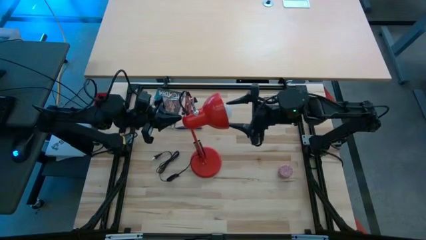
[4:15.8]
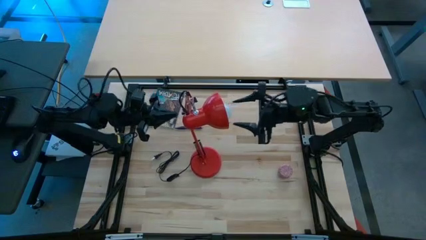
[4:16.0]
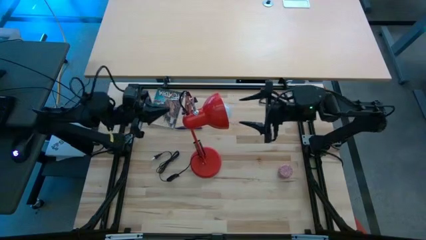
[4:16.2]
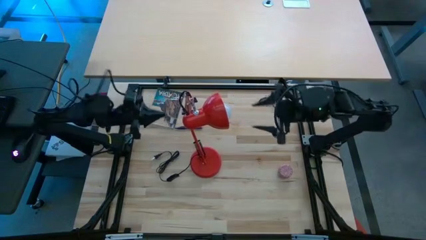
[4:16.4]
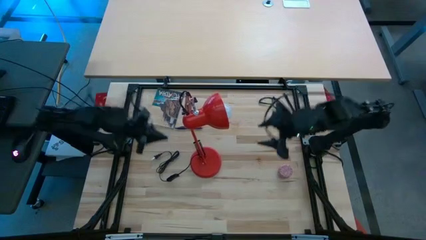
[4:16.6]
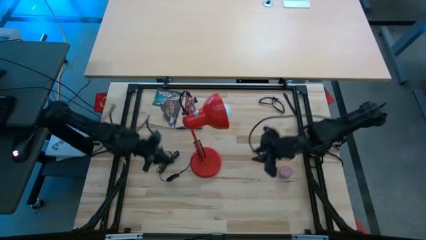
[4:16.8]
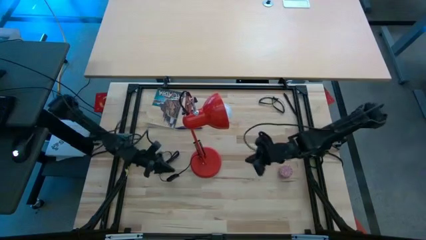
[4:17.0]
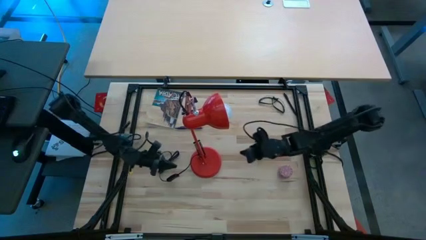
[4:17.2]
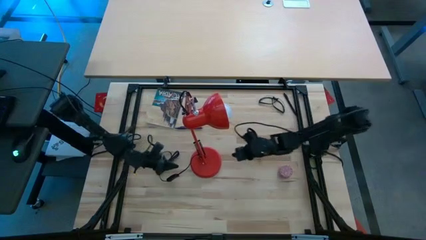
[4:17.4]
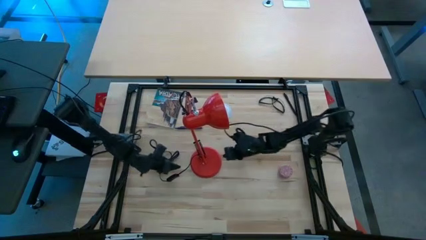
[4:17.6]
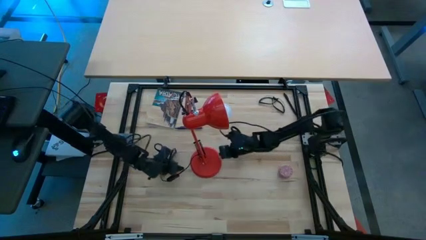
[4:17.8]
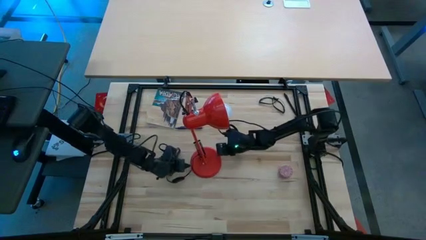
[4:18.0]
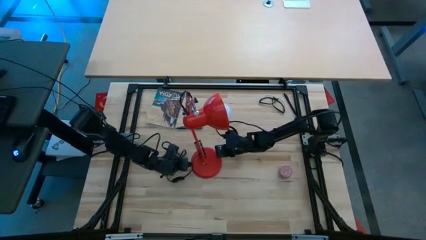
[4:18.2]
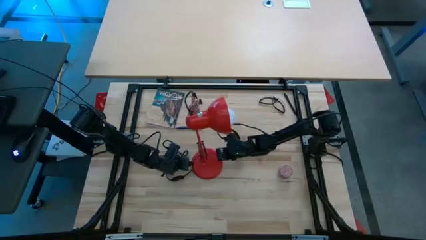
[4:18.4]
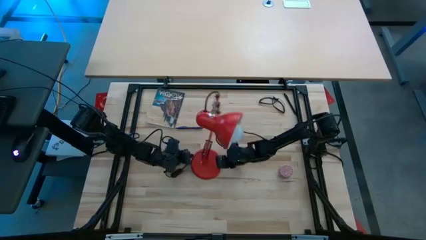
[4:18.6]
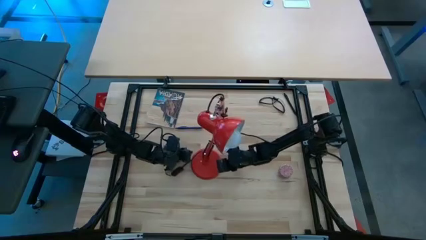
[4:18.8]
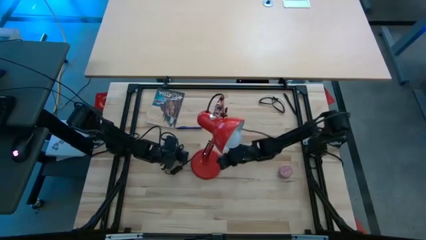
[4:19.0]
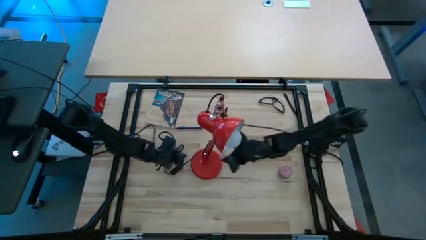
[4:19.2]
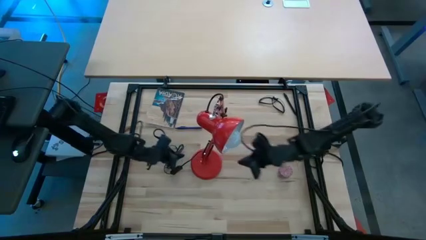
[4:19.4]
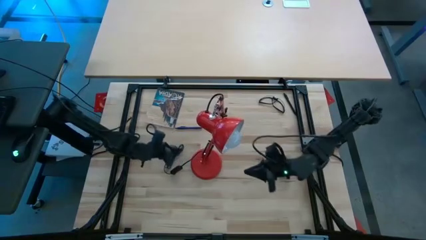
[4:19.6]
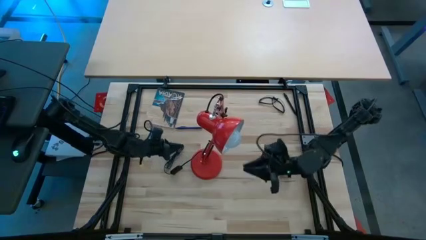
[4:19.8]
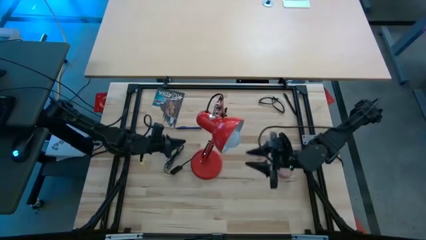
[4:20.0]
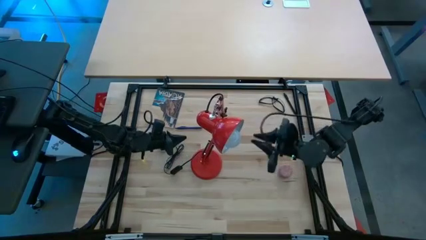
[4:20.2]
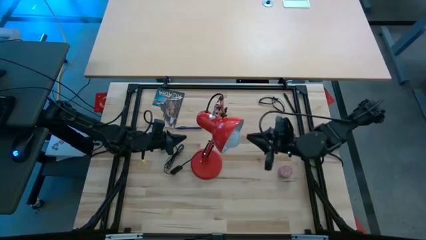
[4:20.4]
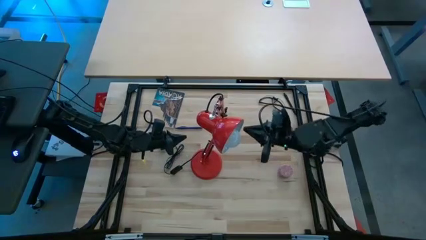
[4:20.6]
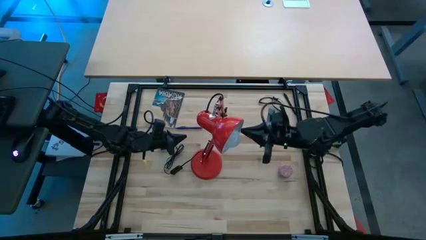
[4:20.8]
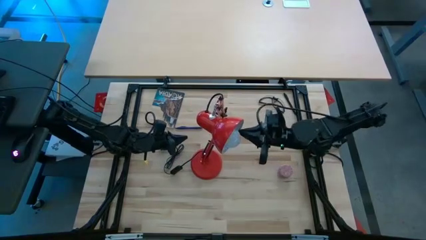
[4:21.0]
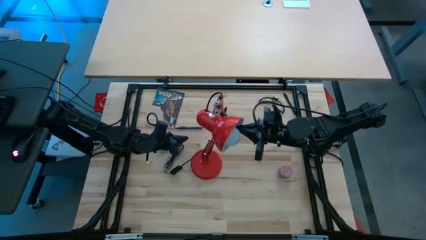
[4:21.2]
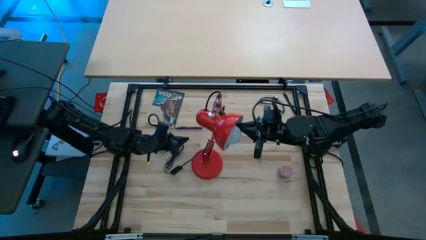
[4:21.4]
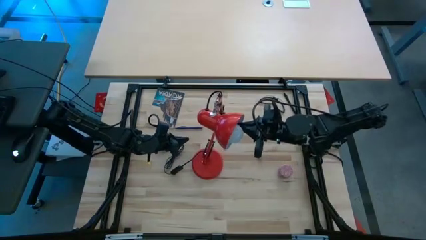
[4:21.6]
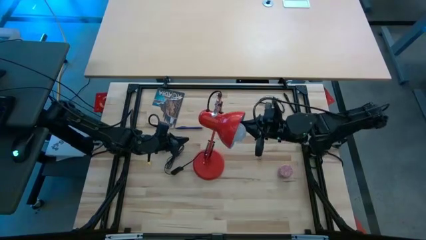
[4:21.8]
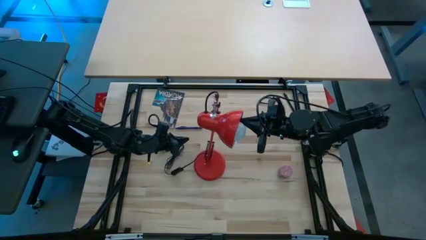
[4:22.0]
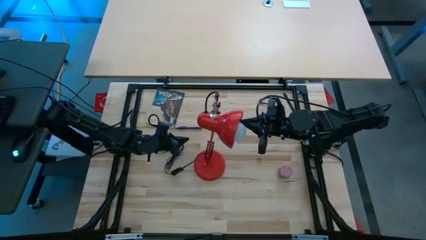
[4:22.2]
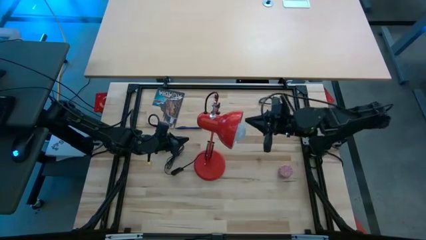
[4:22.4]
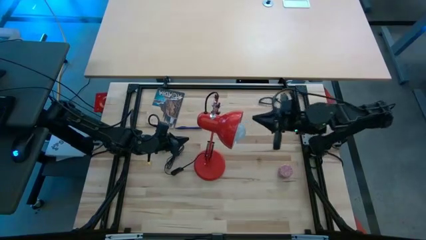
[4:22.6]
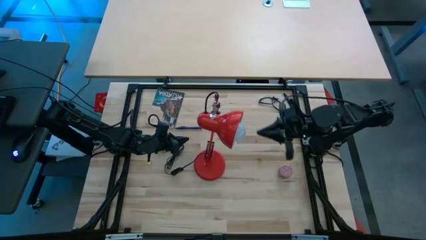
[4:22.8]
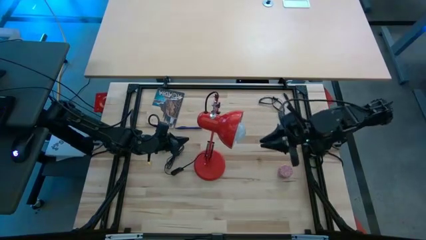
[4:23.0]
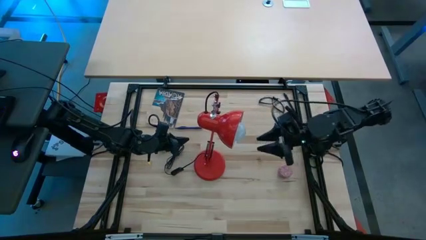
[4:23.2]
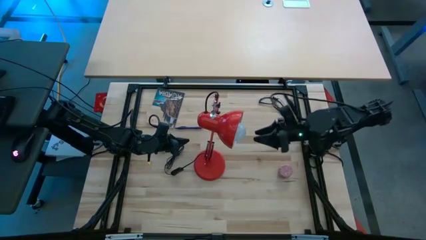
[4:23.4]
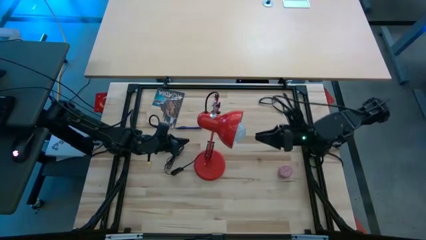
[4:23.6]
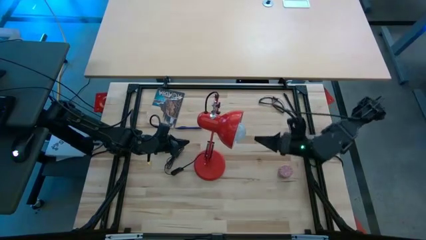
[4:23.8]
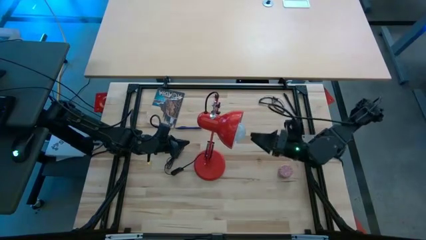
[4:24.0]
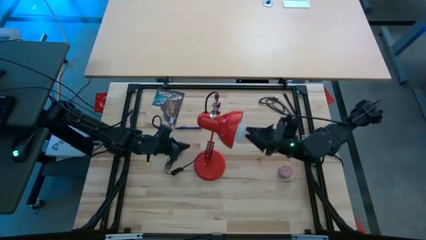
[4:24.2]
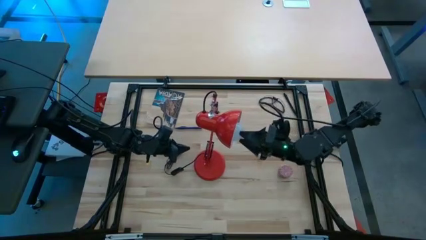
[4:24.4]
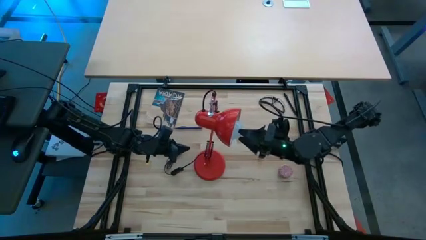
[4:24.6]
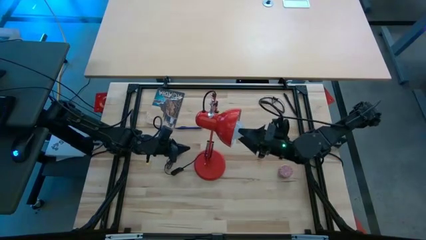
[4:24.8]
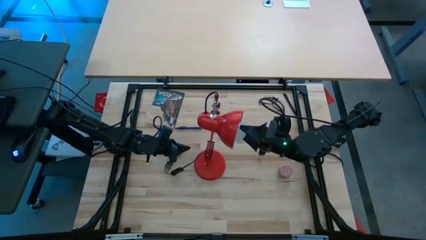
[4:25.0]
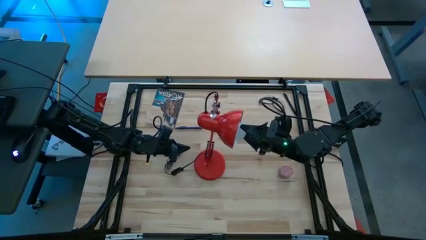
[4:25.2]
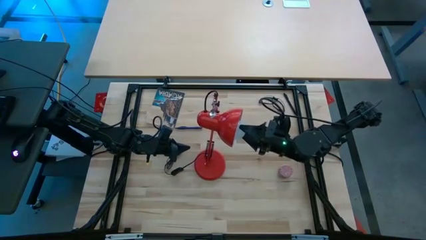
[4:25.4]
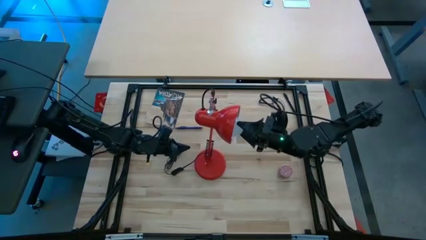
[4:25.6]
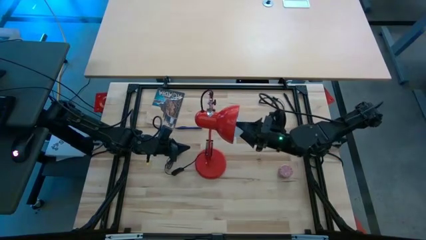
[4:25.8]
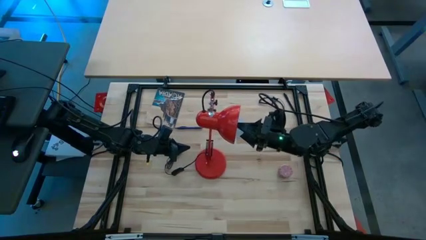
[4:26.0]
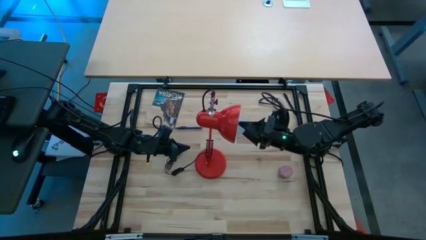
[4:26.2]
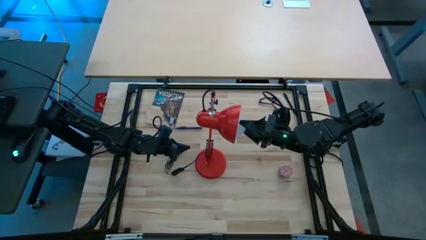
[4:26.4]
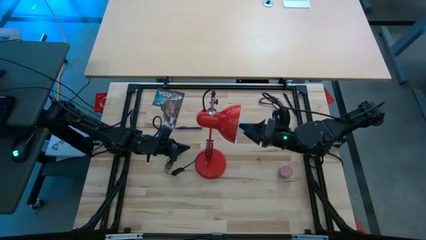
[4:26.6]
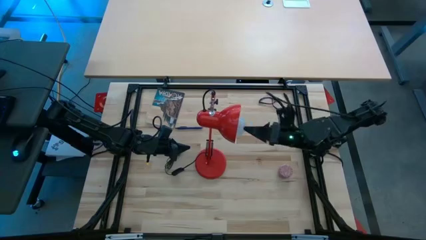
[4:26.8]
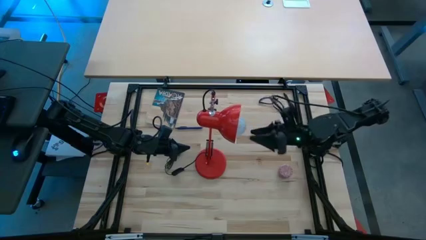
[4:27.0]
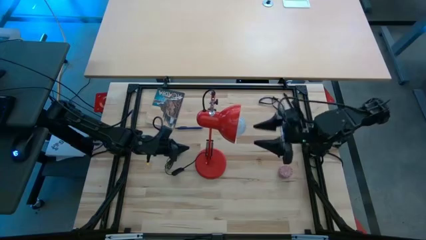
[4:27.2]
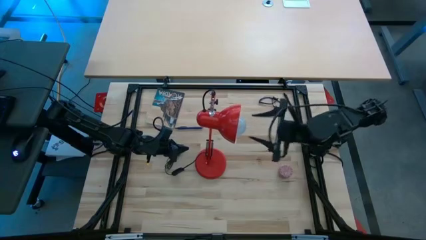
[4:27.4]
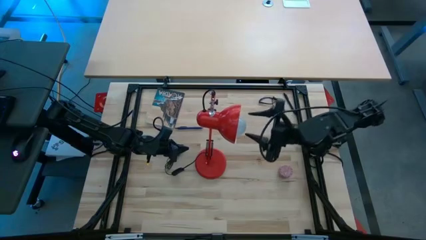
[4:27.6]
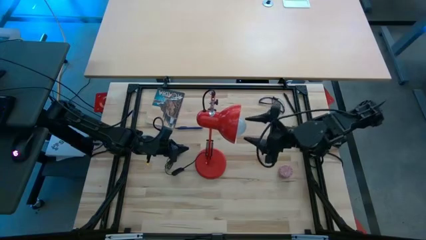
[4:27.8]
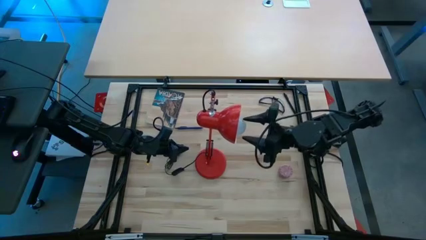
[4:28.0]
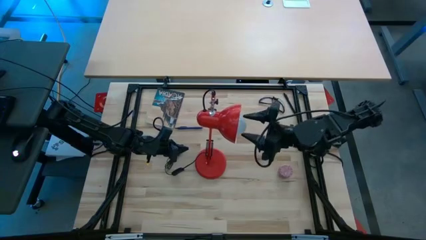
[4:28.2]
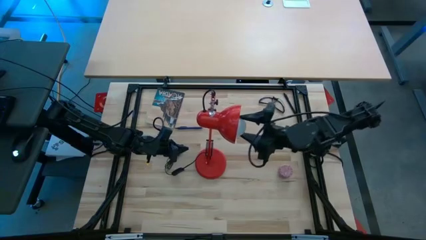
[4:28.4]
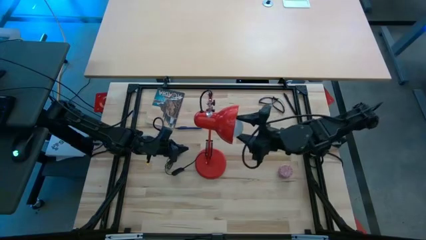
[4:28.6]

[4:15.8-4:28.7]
Task: Screw lightbulb
Remove the lightbulb from the lamp

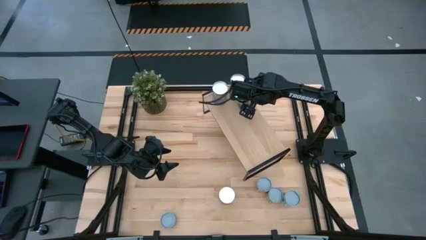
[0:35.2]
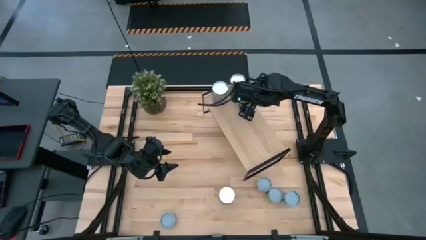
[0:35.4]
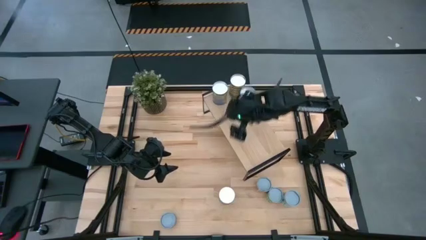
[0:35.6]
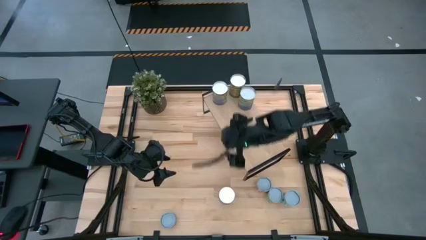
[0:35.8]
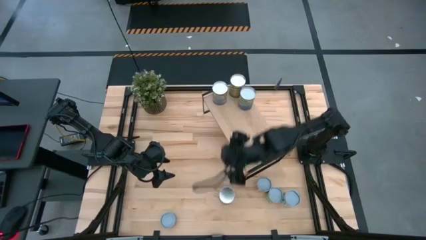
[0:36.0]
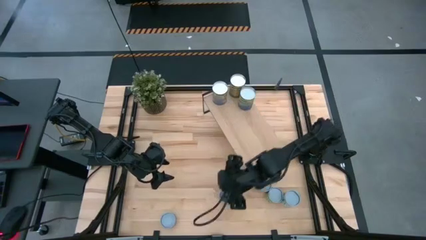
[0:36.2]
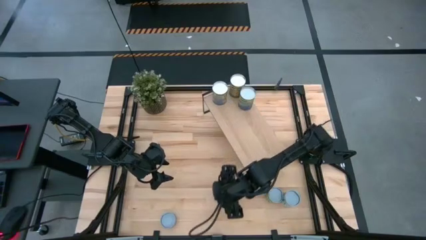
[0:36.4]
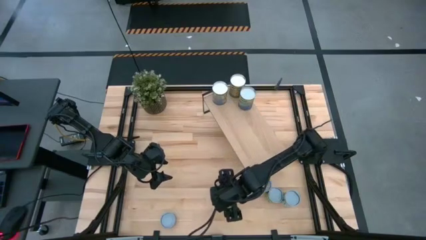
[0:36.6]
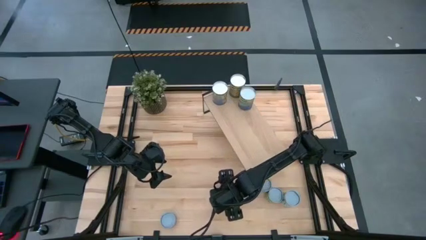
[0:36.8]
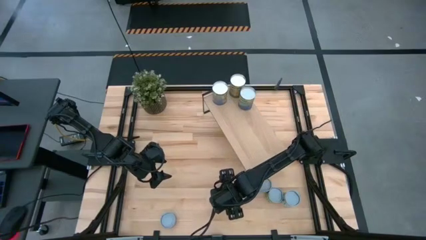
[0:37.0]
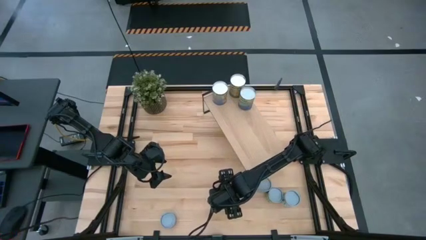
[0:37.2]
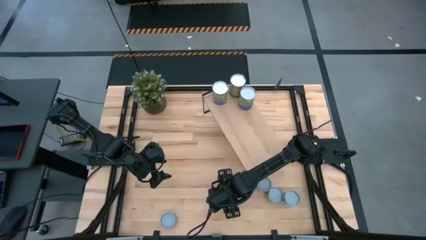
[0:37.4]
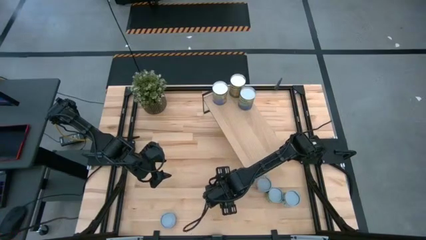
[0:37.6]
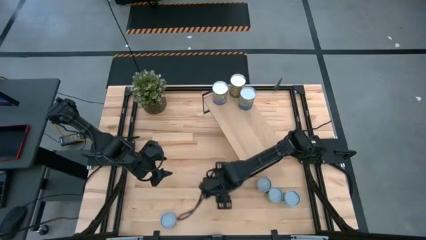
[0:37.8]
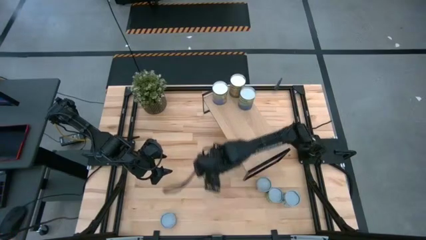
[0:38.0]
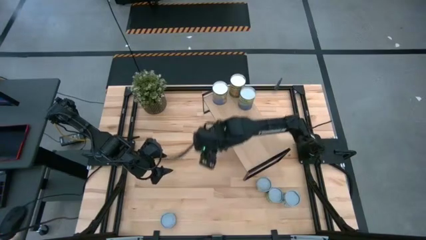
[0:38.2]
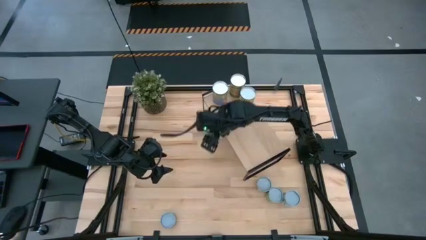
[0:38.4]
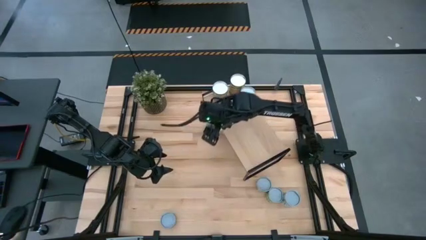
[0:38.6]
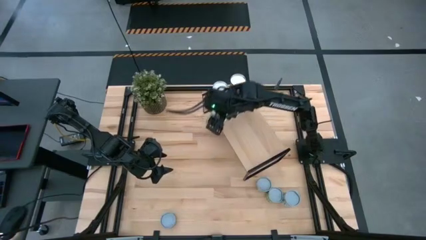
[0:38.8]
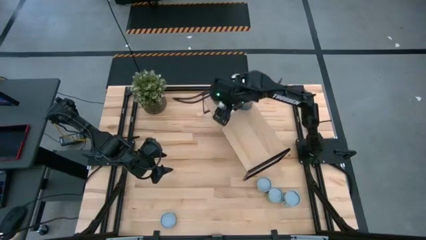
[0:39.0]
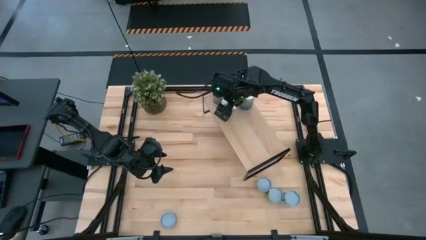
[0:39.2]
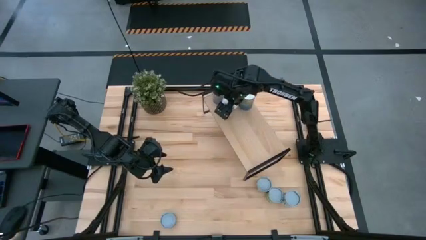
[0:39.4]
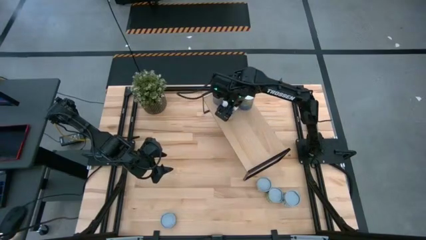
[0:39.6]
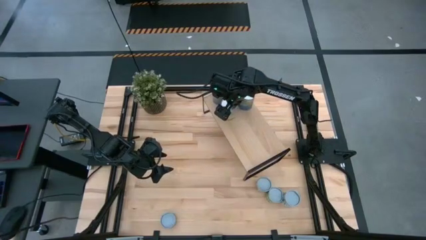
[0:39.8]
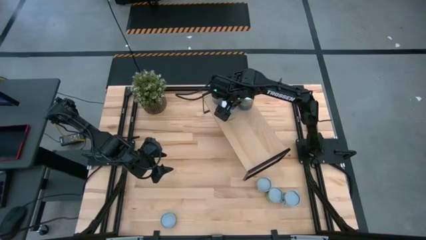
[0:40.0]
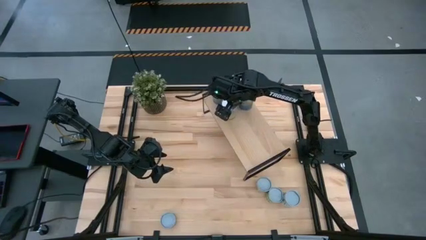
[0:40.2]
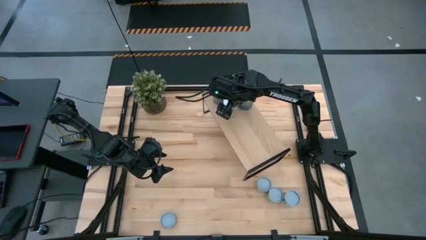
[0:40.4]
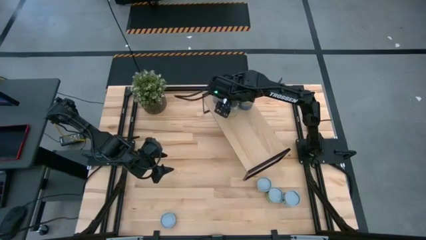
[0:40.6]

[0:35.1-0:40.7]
Task: Pick and place cans onto a shelf
Put the canned carrots on the shelf
